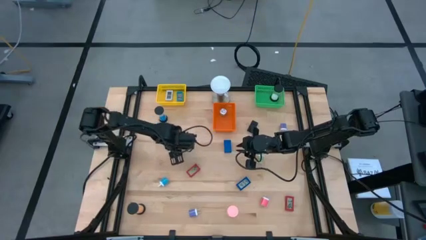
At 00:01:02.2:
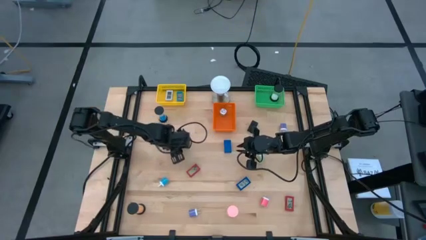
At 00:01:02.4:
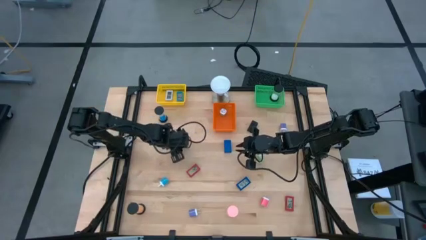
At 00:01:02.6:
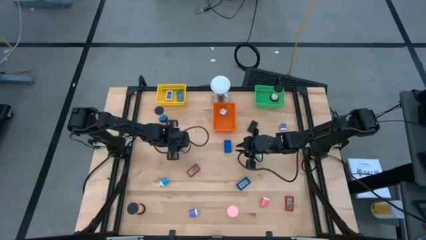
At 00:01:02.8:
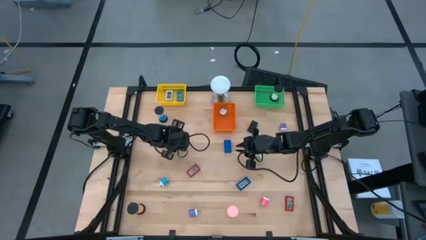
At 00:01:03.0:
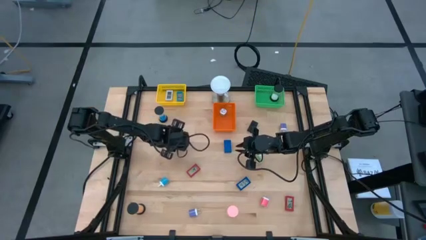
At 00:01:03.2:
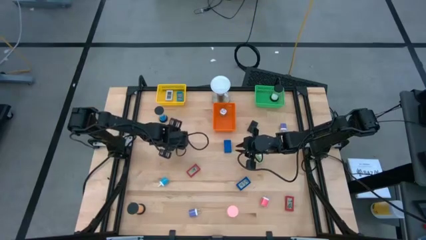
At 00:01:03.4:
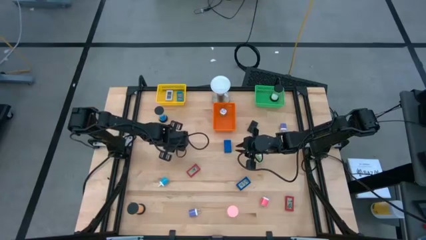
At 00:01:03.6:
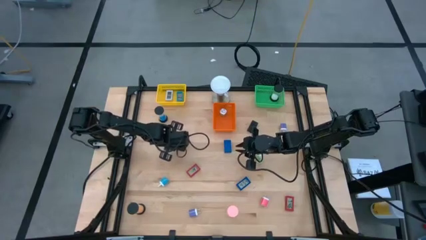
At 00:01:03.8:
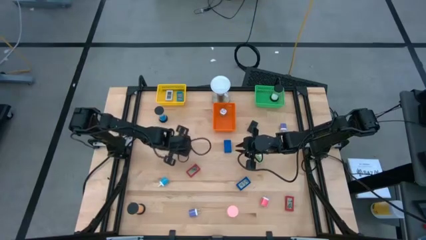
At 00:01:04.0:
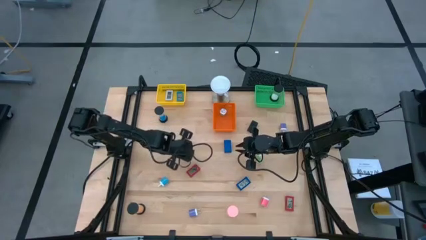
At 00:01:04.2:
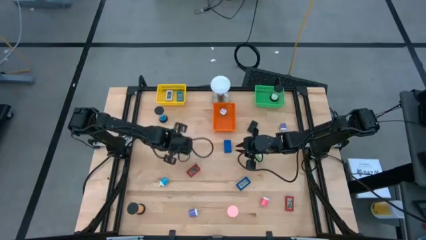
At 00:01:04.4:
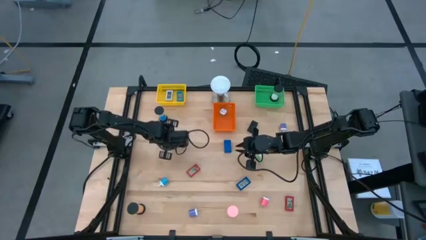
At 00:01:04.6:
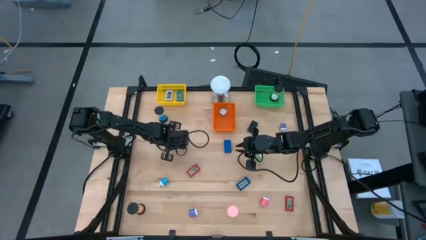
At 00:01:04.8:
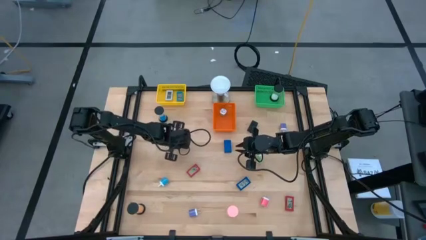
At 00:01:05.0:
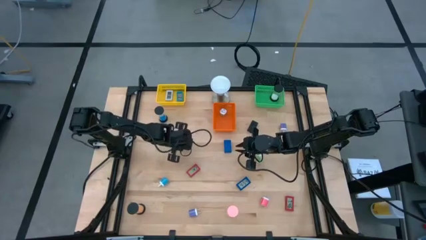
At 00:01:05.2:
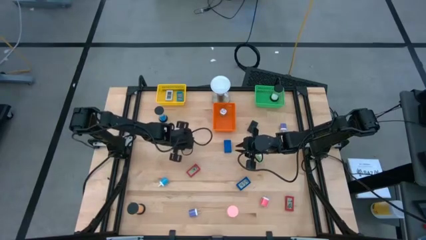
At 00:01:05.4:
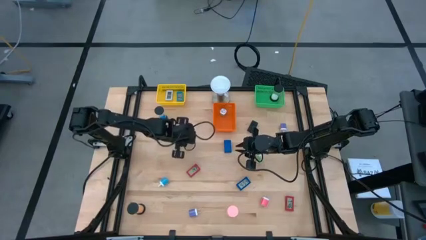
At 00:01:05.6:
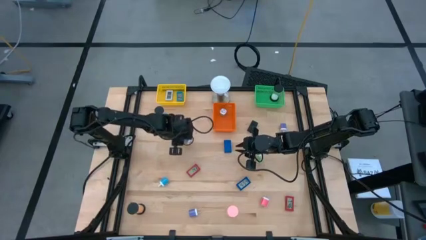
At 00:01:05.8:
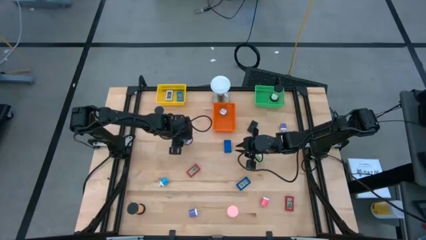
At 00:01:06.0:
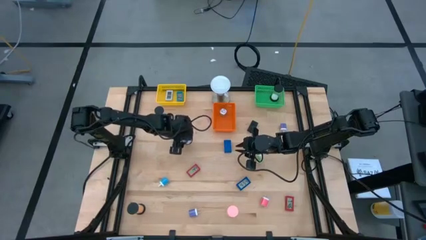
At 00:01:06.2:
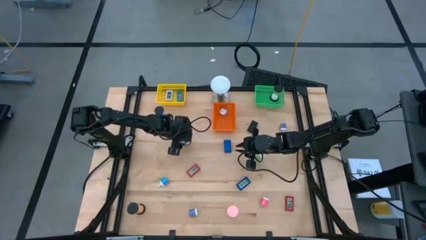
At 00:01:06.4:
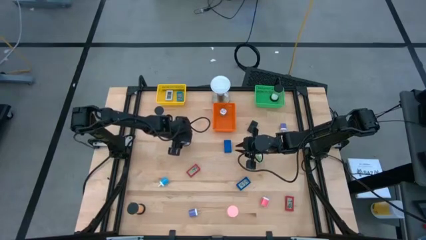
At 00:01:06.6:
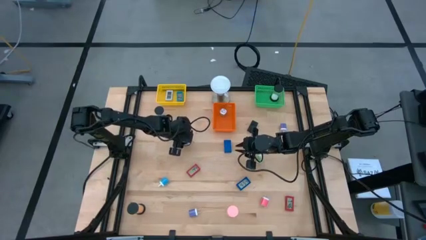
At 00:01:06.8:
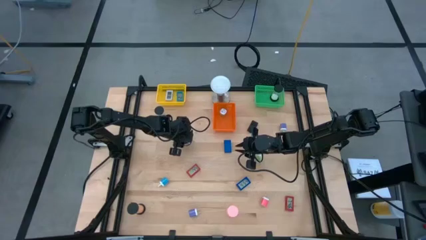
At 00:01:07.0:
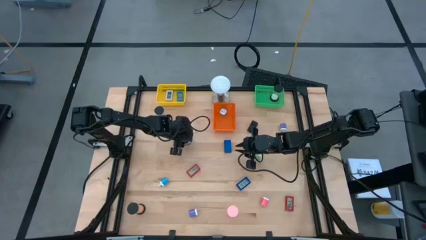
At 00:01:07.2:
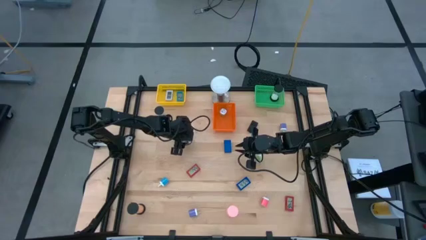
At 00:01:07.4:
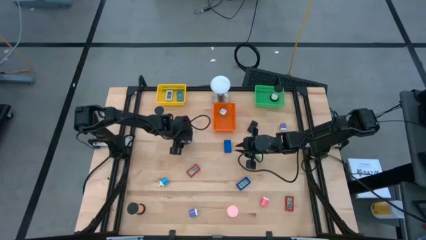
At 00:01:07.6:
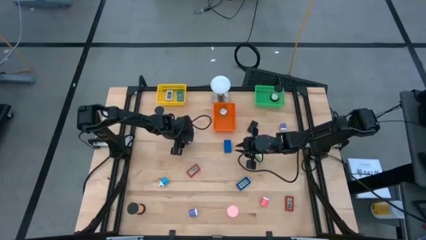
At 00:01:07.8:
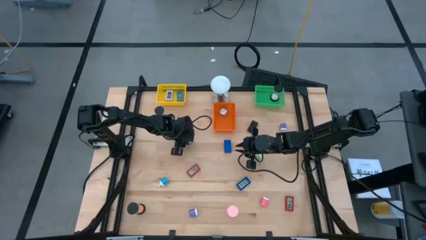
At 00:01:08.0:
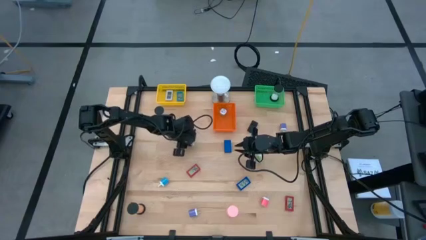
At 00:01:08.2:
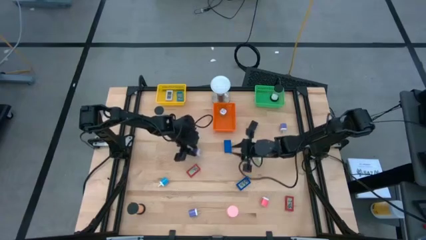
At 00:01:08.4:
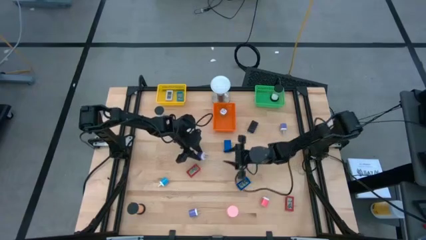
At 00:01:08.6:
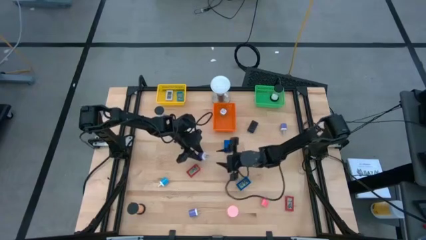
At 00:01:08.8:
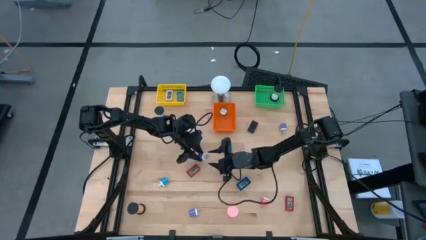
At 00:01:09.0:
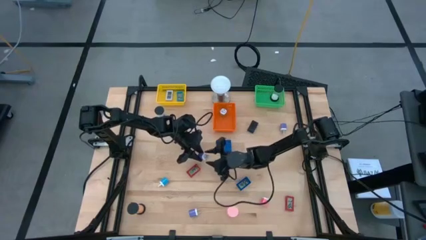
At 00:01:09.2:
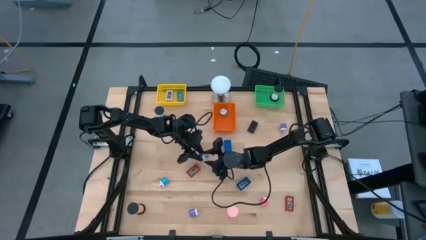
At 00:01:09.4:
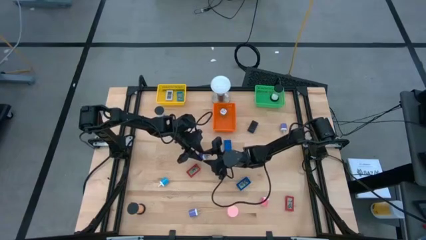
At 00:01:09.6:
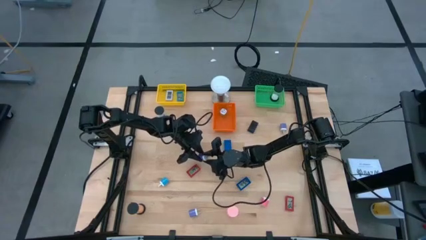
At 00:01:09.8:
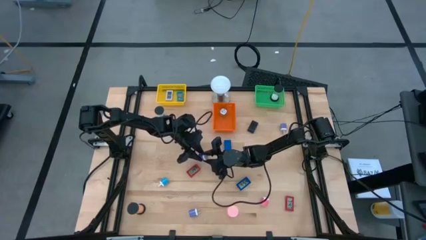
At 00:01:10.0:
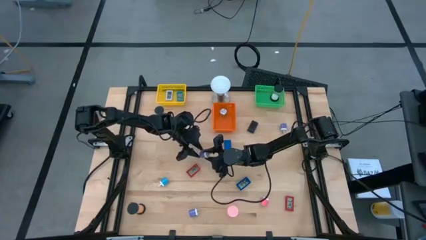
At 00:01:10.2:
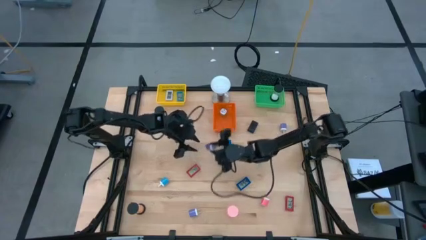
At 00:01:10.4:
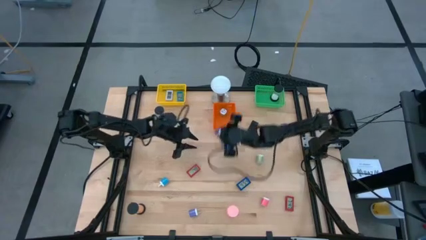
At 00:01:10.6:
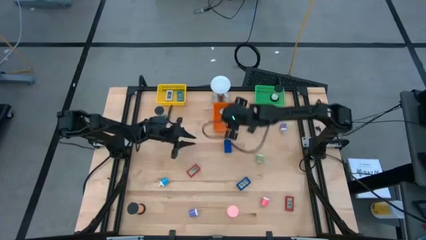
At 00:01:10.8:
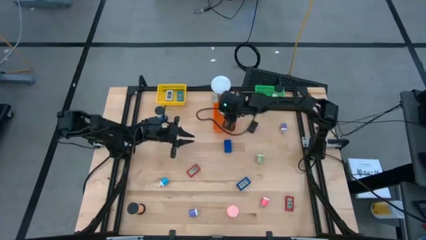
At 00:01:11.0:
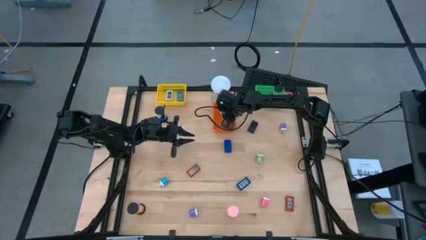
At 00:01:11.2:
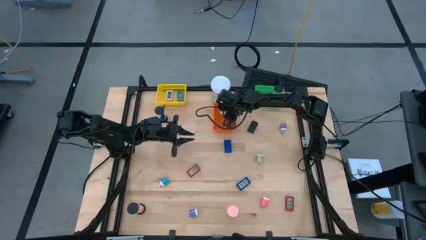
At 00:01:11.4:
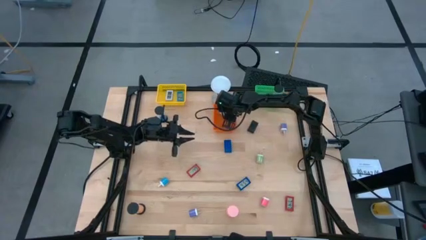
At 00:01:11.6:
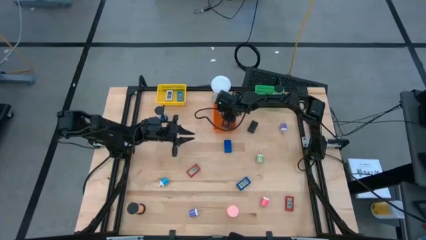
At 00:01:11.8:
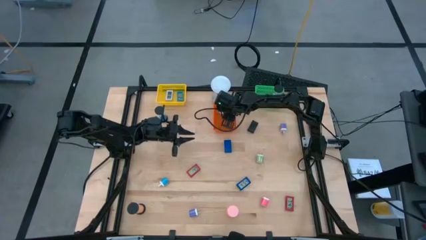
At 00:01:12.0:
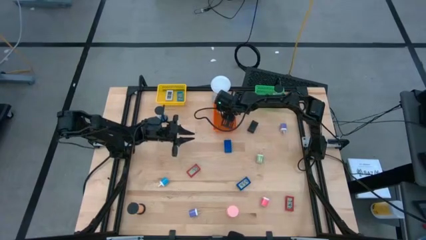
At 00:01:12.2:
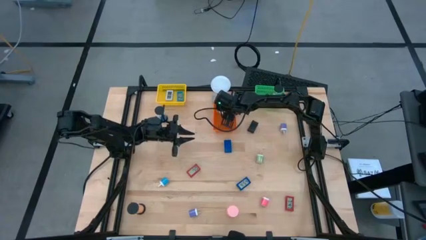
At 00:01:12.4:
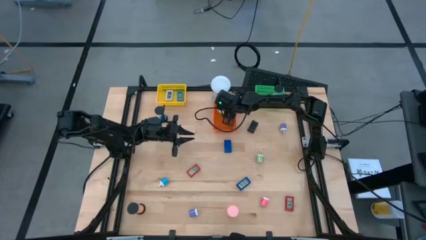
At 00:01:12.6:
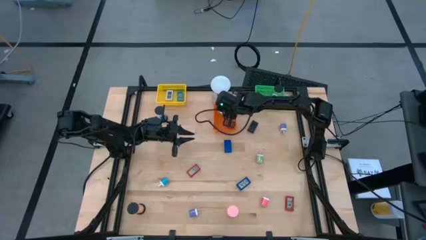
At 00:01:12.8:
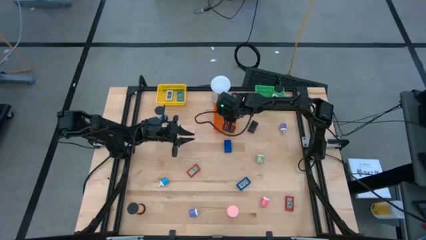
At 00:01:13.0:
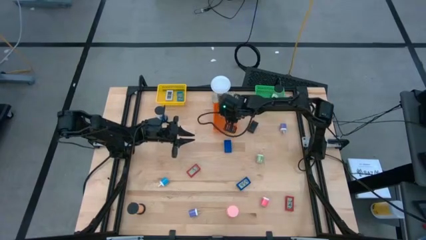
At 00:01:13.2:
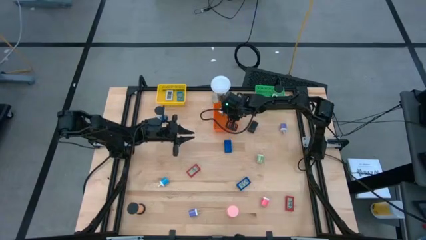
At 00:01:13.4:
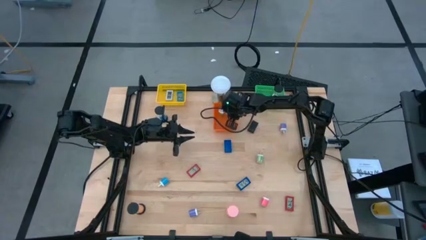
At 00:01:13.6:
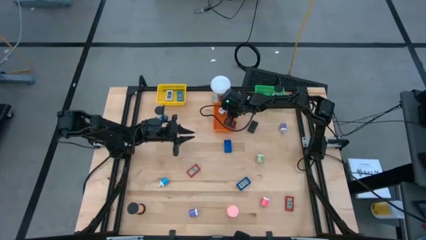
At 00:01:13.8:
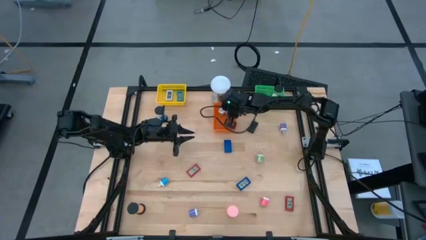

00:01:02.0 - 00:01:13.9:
Task: Pick & Place Office items
Put the middle purple charger adapter into the orange bin

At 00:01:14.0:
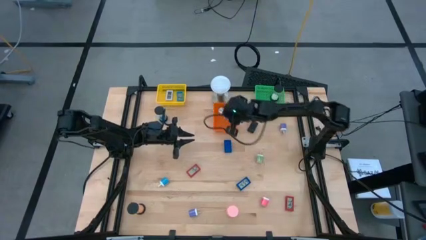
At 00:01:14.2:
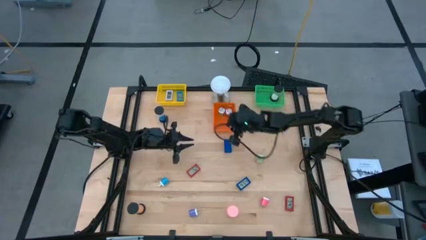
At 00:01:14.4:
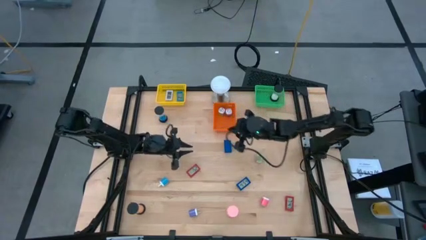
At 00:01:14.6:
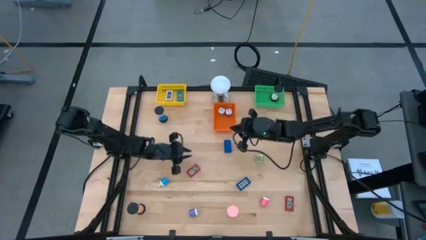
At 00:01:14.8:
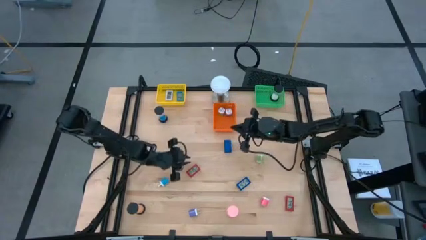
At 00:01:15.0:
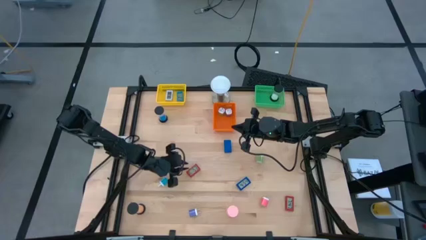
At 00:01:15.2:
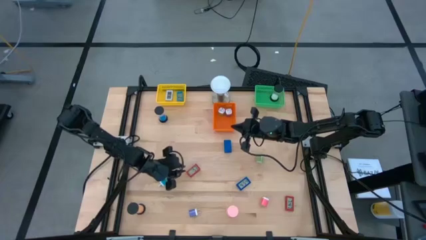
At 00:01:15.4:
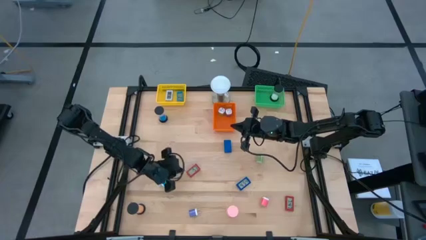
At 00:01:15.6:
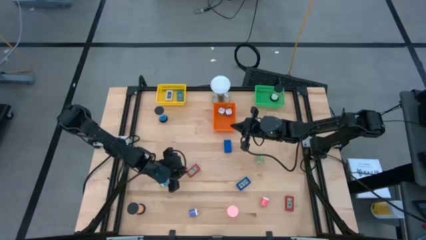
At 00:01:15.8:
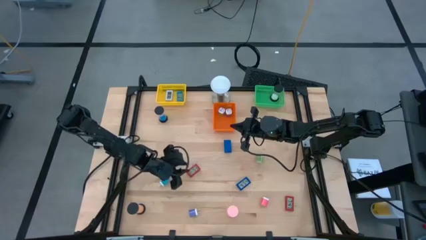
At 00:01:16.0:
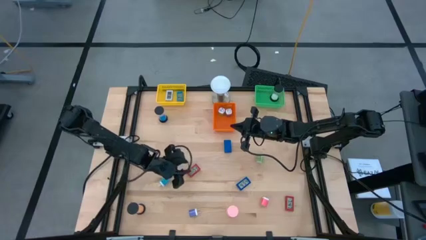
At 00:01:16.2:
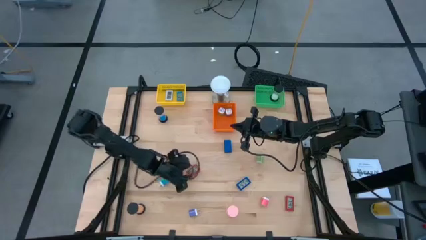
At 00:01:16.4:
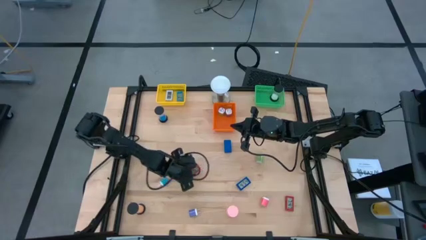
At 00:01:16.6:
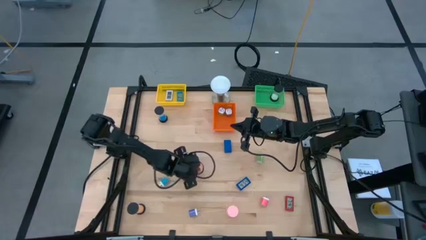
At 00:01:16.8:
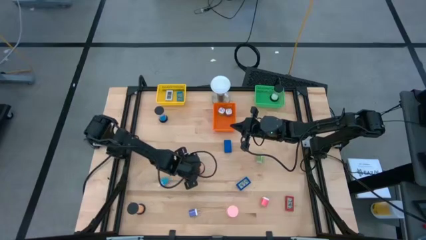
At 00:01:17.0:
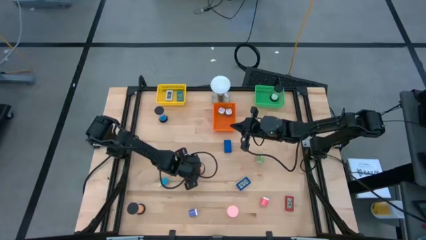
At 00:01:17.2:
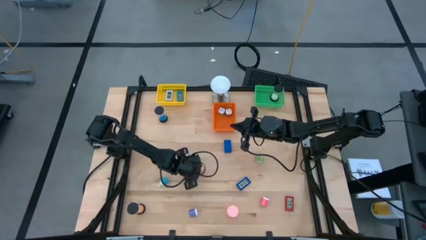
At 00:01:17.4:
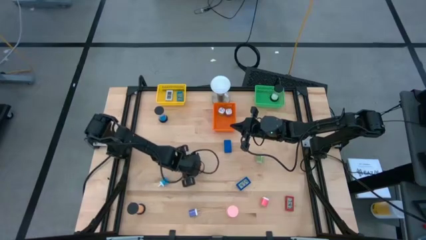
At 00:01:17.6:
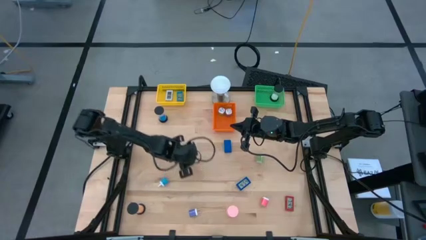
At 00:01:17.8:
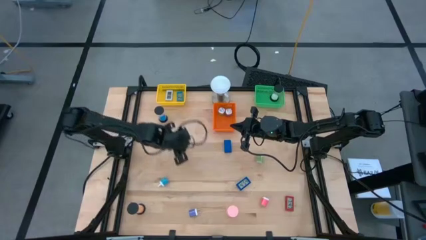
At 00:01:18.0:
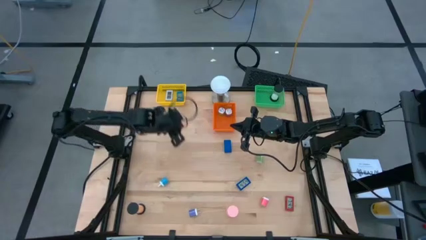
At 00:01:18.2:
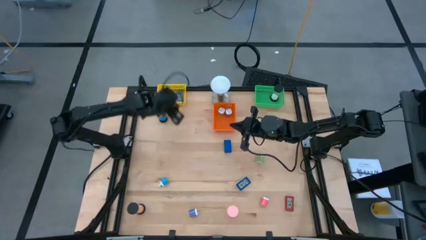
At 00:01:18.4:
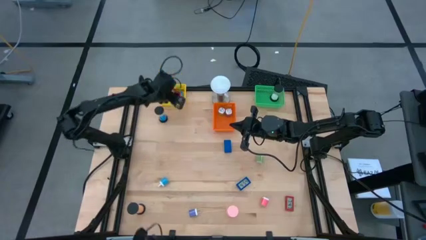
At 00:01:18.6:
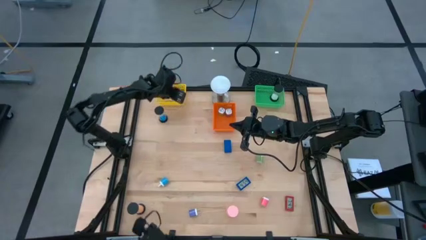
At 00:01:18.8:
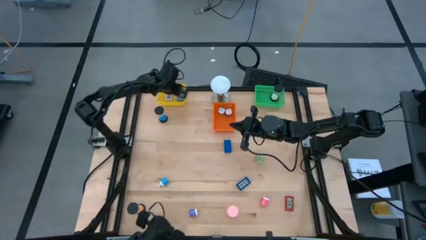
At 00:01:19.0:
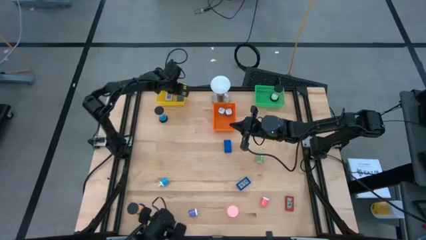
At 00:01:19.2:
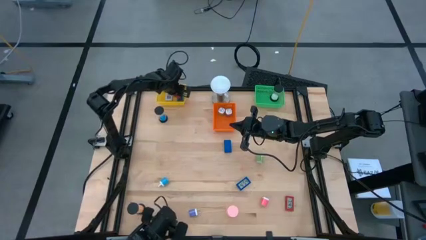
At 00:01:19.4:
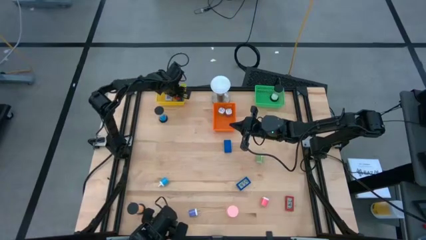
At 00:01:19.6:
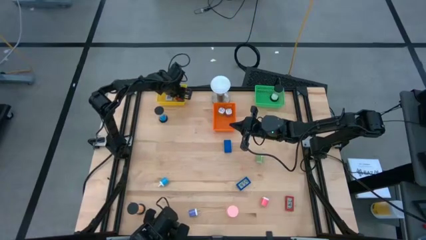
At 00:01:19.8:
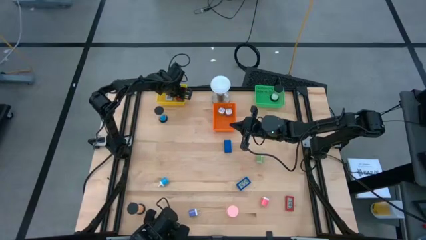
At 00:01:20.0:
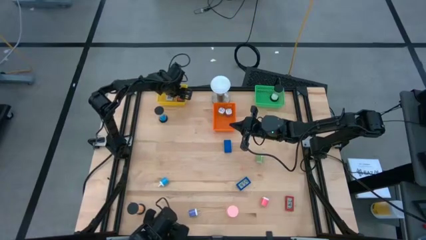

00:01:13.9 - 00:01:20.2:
Put the top red digital clock into the yellow bin
